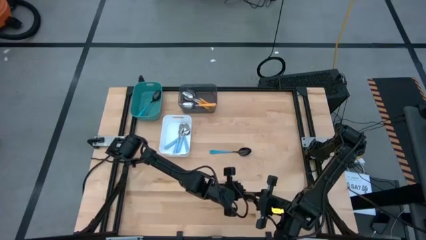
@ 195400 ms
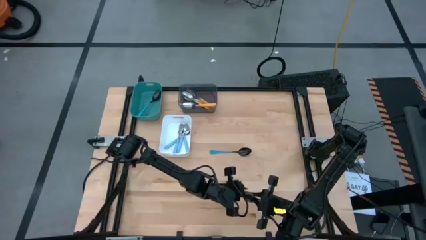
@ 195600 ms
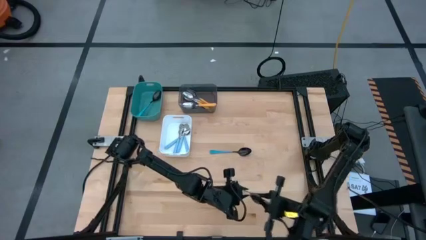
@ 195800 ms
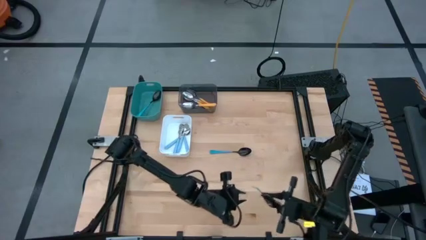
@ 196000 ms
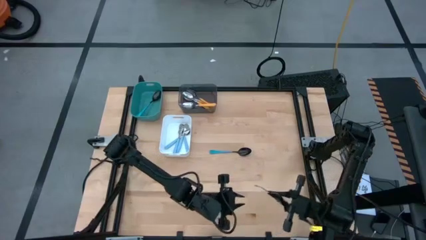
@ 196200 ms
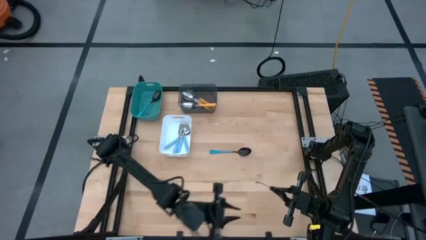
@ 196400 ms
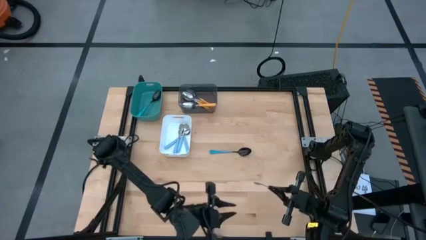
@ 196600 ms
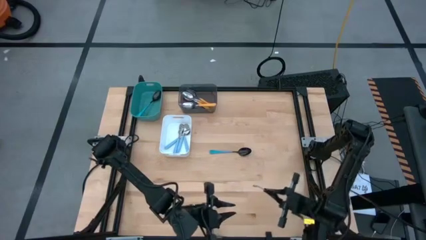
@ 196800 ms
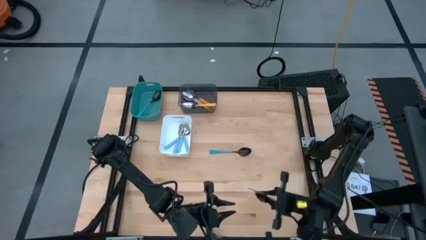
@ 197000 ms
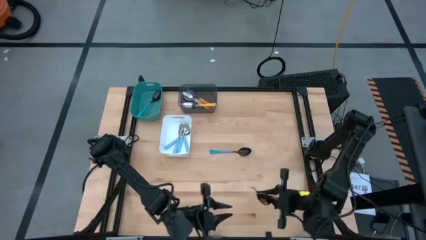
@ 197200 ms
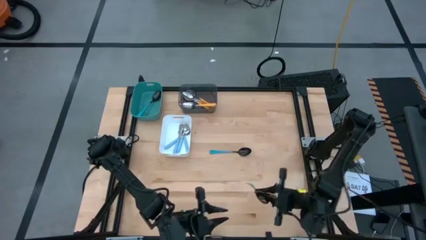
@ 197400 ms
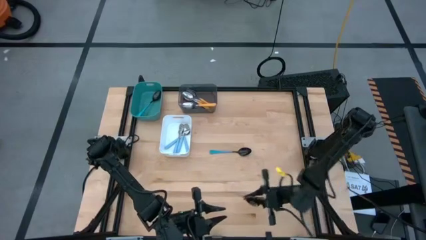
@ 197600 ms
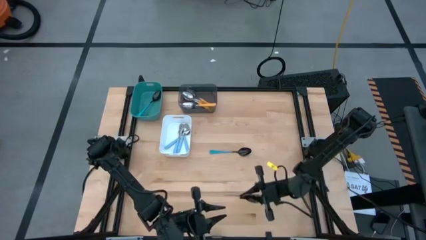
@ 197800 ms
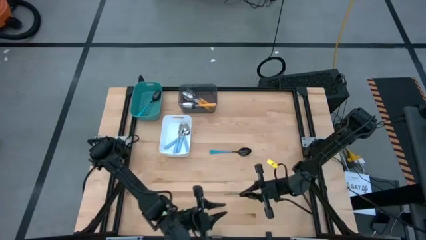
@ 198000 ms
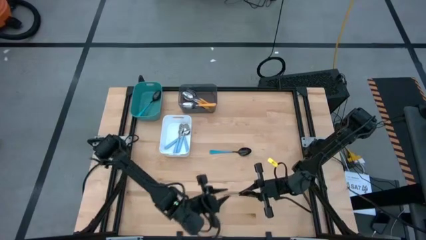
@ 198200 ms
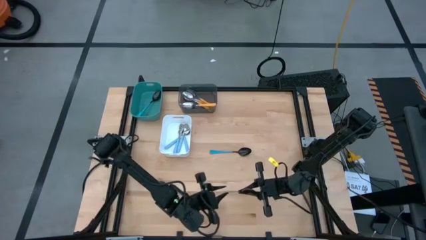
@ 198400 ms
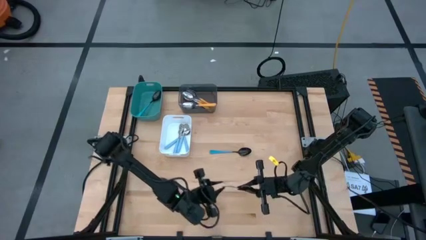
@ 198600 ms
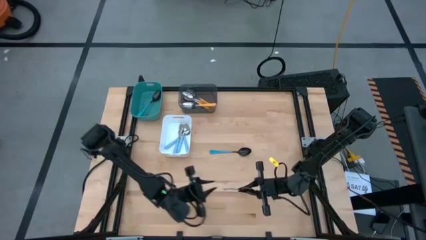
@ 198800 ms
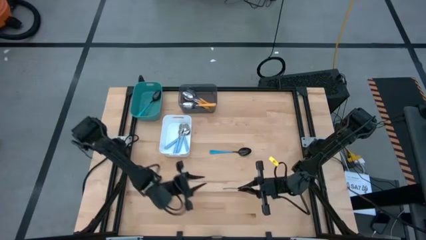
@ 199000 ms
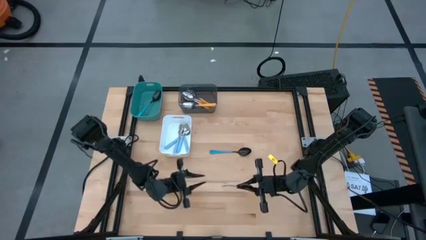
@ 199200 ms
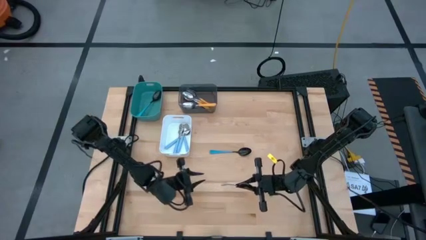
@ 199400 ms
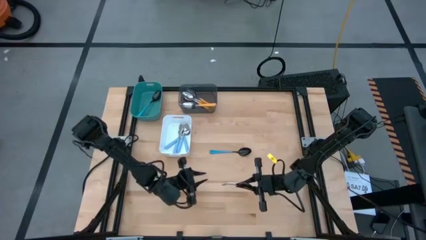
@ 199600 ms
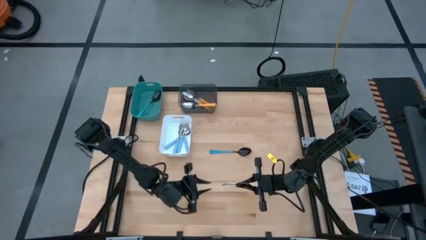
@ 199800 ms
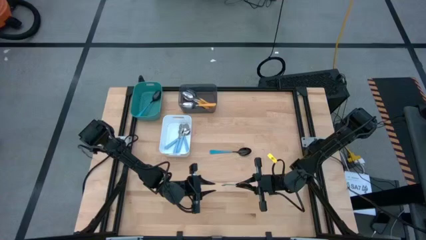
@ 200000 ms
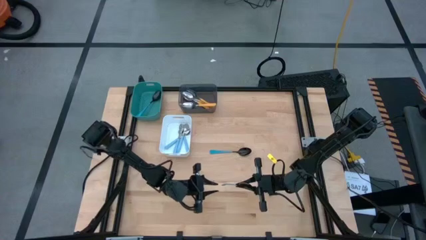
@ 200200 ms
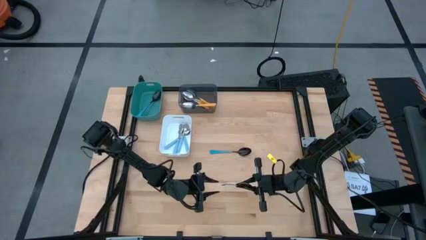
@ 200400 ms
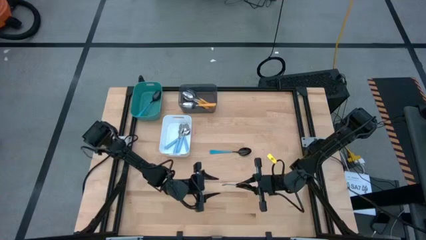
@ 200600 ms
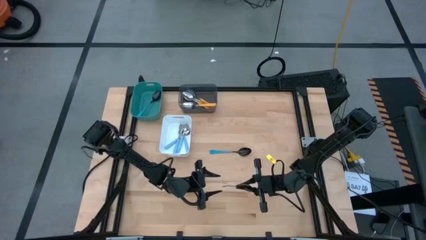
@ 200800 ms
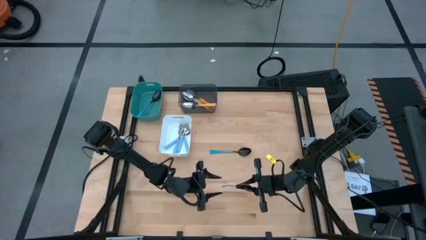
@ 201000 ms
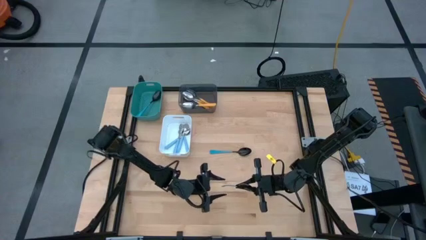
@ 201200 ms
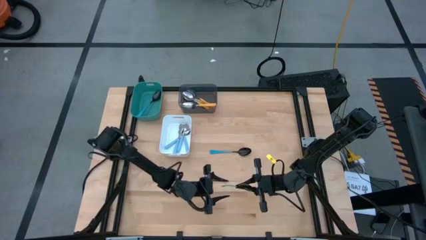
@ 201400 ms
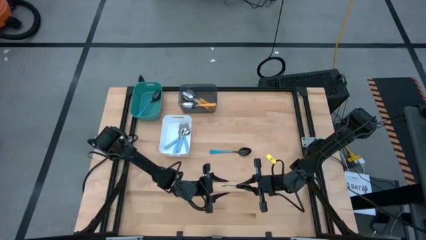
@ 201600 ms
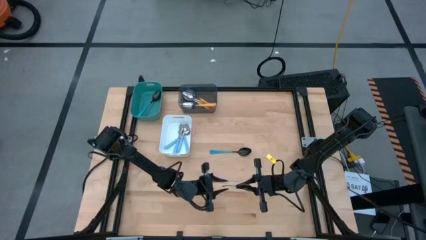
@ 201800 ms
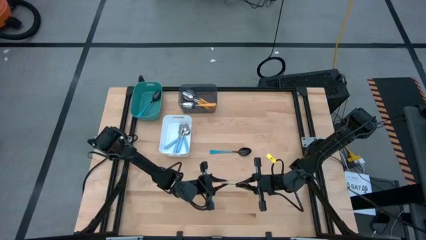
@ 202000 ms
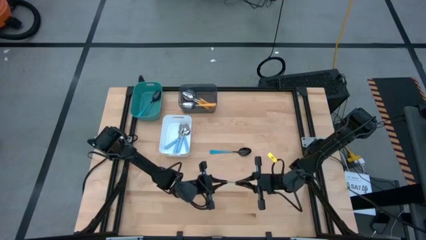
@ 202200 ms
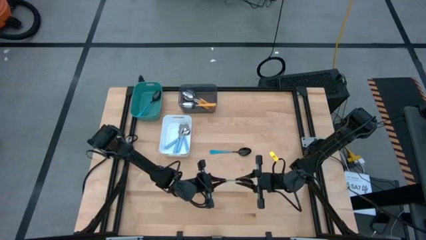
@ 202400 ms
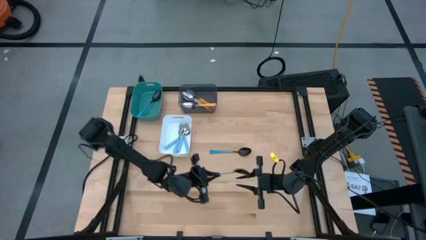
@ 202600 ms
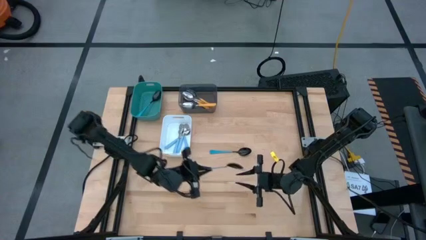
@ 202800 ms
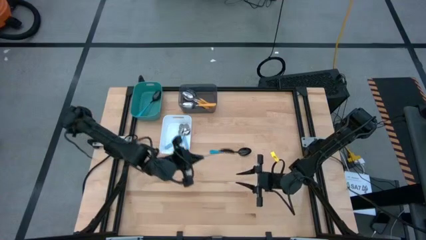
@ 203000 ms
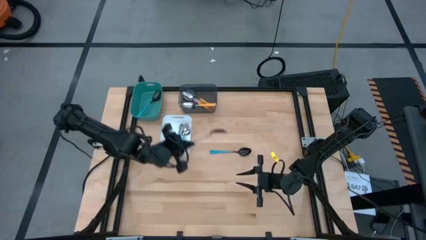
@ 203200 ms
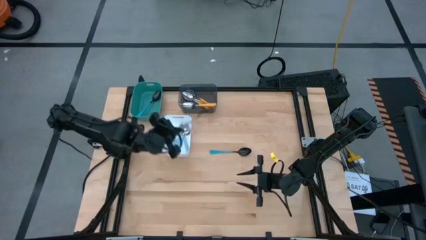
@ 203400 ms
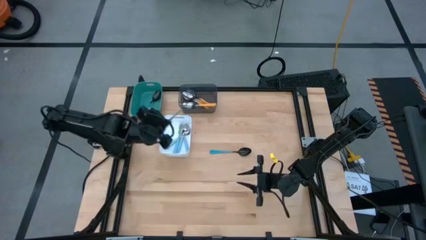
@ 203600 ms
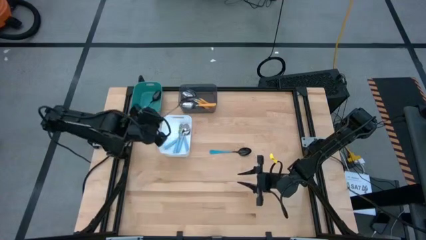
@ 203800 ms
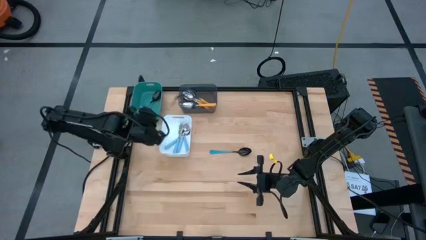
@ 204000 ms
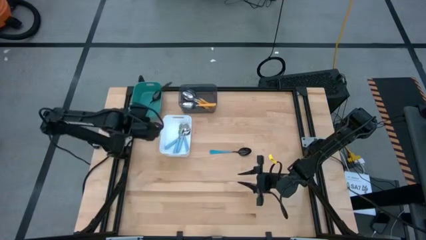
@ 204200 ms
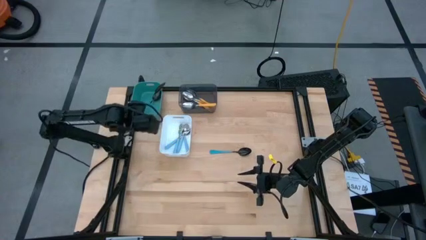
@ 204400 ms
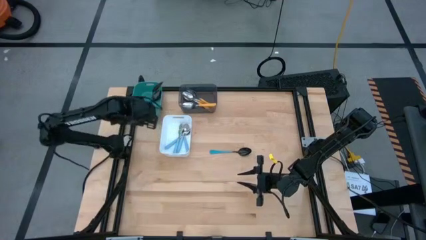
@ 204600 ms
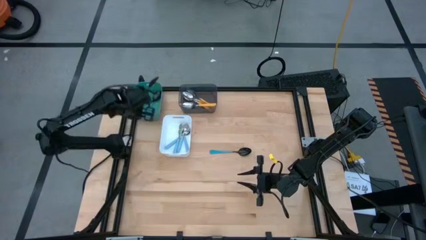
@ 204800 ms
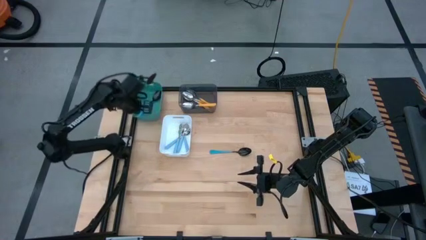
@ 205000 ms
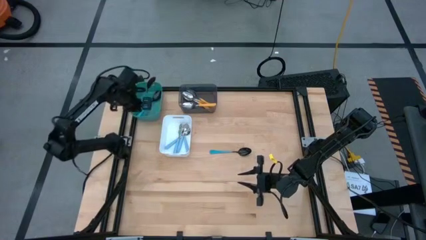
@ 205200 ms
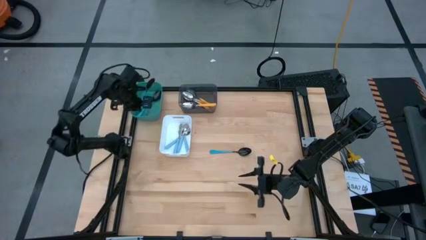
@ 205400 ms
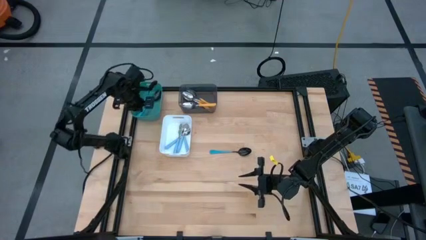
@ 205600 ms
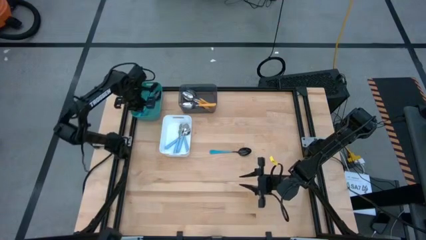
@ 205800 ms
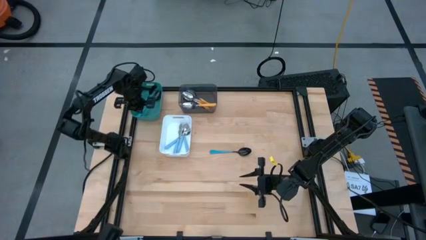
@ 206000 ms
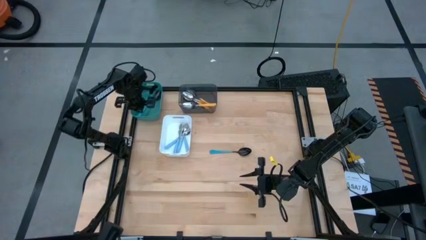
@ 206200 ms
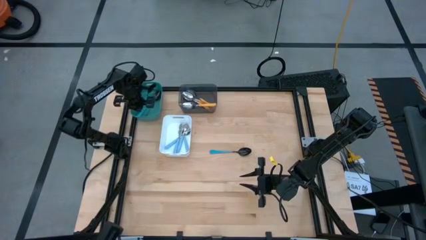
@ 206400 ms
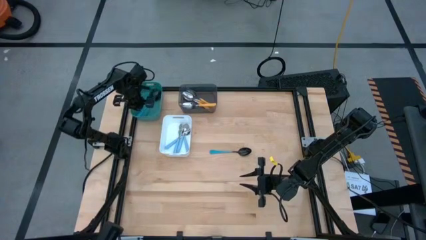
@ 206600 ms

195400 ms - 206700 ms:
Task: Sort silverware by color (type)
Put the bottom blue spoon into the green bin

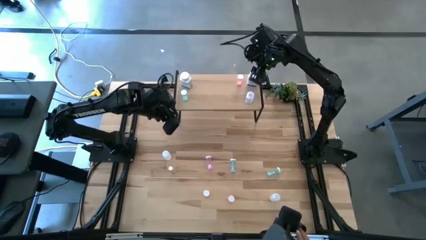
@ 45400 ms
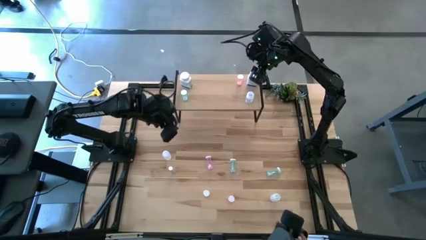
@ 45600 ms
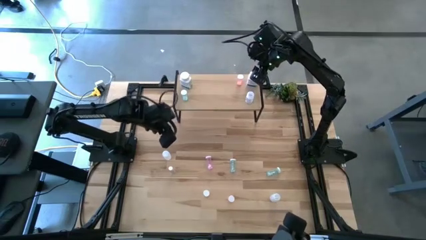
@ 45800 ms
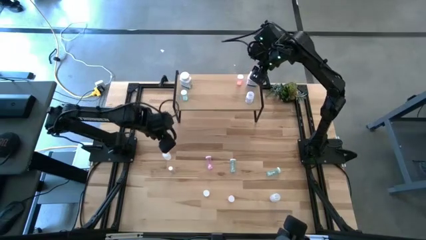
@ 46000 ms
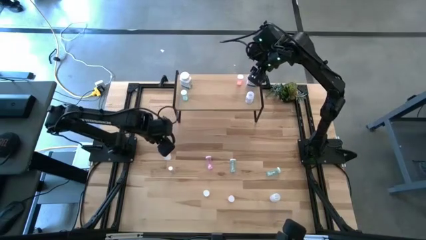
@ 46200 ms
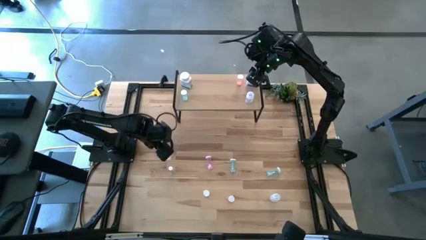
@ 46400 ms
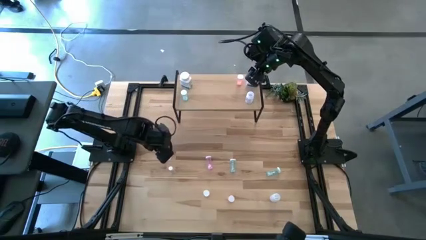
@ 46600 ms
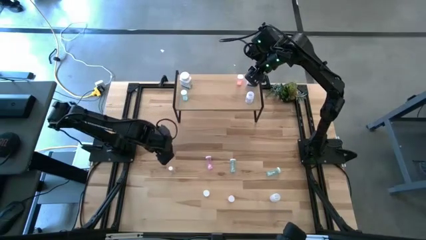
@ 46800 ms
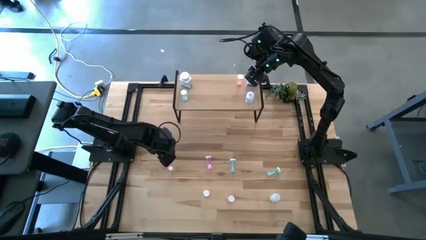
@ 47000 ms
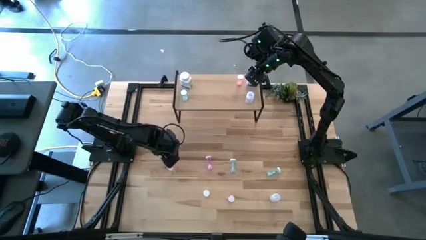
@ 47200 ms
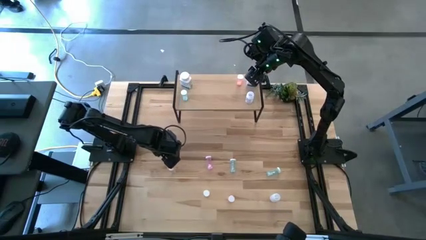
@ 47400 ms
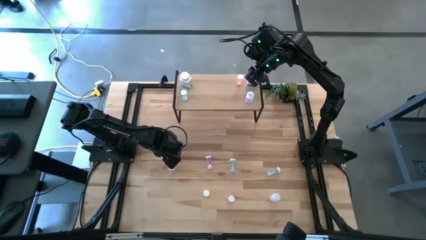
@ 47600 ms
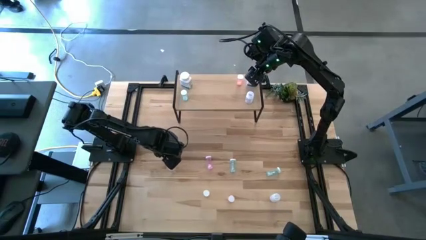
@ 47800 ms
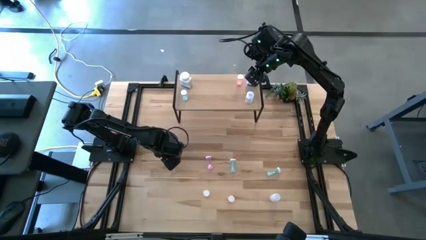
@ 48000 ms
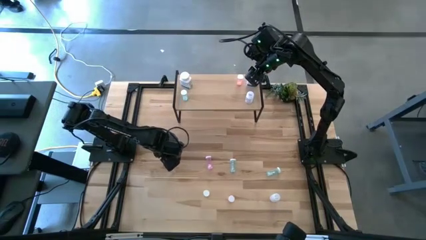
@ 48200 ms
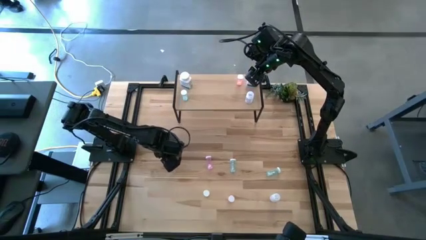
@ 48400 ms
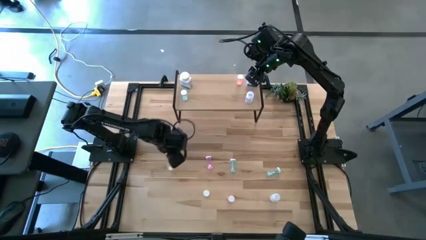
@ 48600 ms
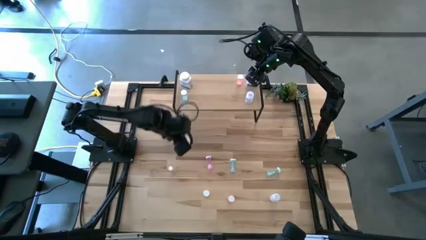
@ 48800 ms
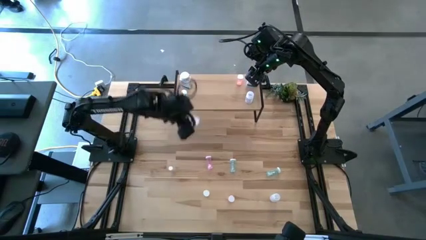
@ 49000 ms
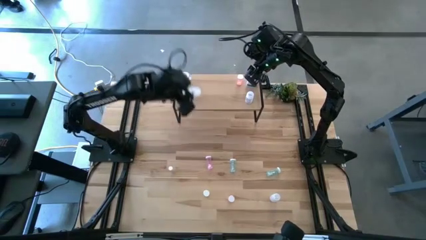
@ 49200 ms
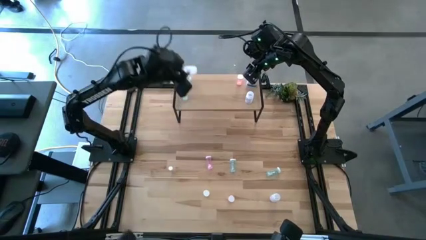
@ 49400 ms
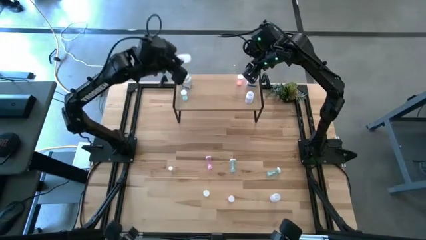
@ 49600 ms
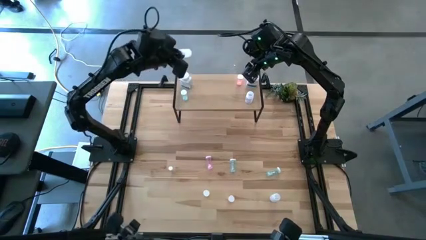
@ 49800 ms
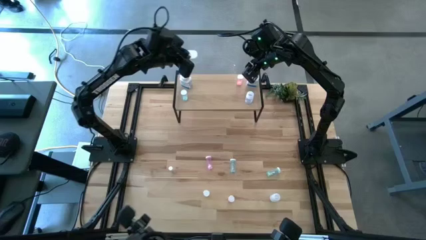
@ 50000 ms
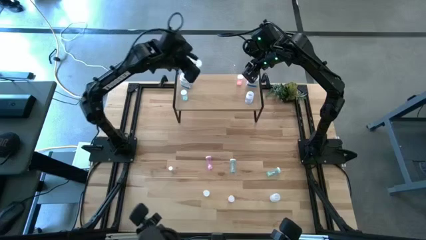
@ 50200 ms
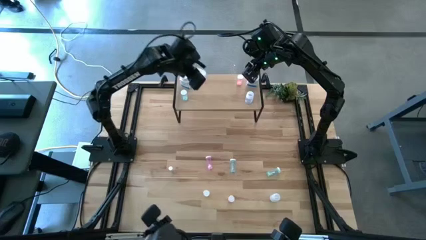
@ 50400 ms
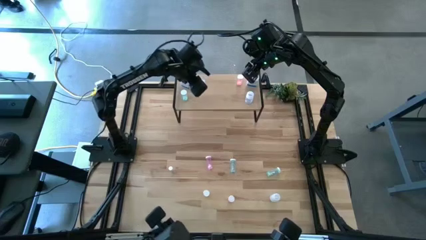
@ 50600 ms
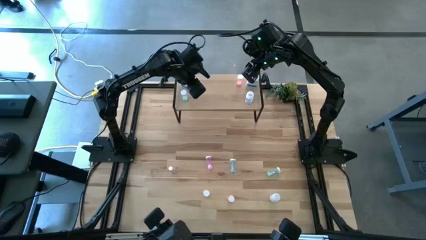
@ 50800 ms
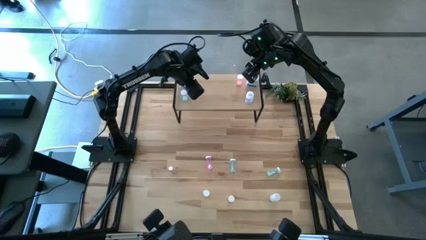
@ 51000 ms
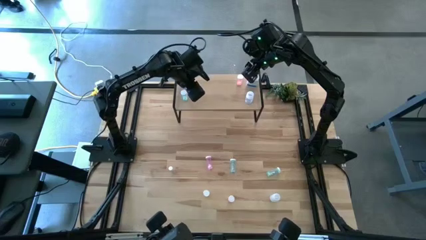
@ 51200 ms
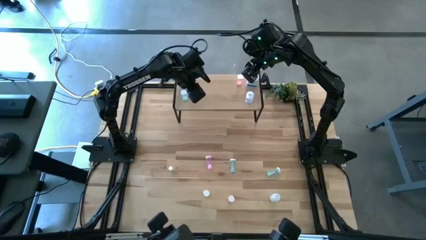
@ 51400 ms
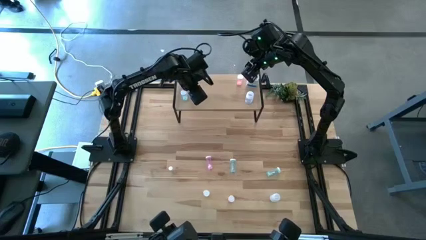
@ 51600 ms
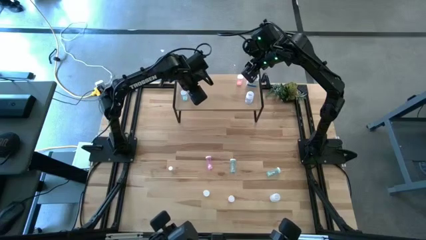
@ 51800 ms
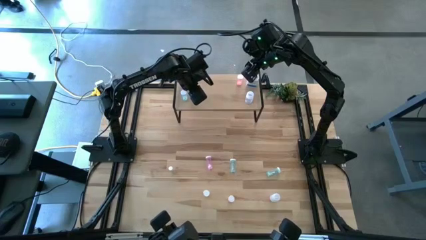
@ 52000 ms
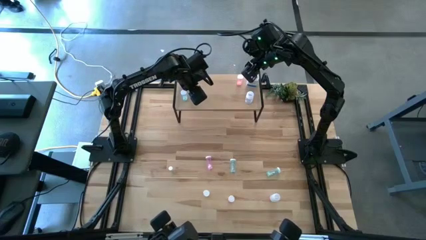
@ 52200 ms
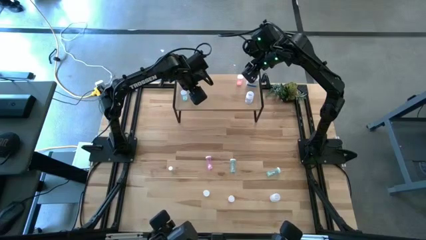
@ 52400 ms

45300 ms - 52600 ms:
Task: Pick and place medicine bottles onto shelf by color
Put the left transparent medicine bottle on the shelf
